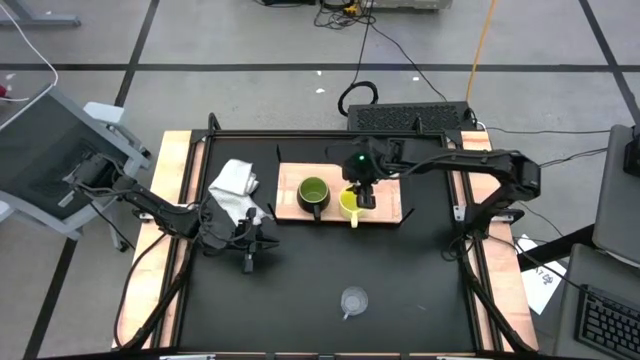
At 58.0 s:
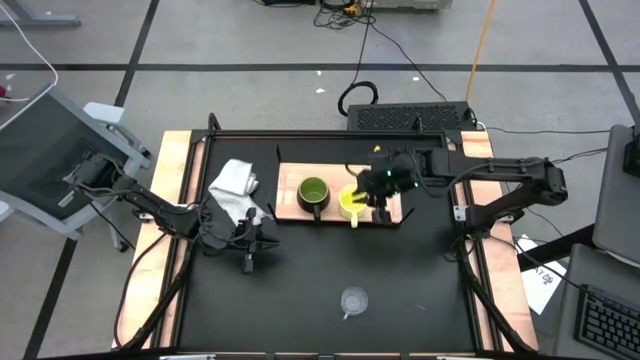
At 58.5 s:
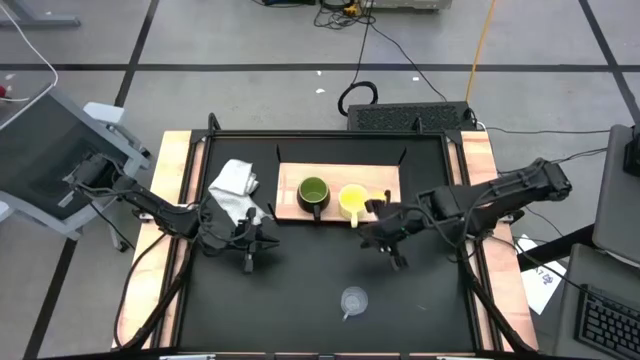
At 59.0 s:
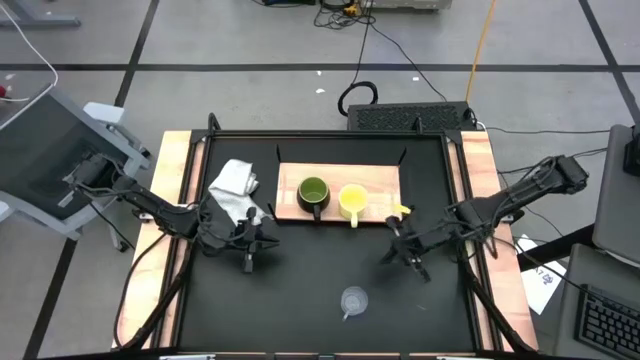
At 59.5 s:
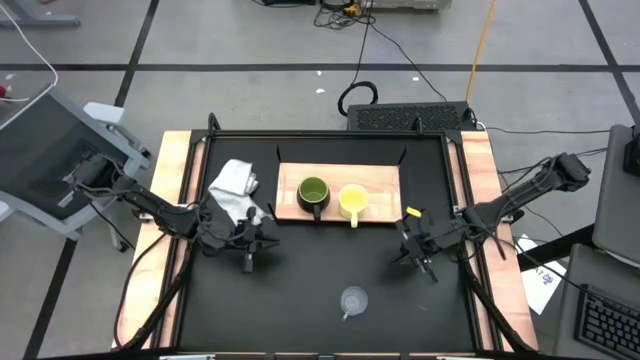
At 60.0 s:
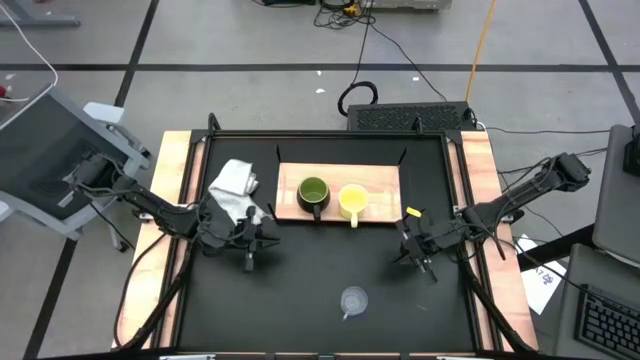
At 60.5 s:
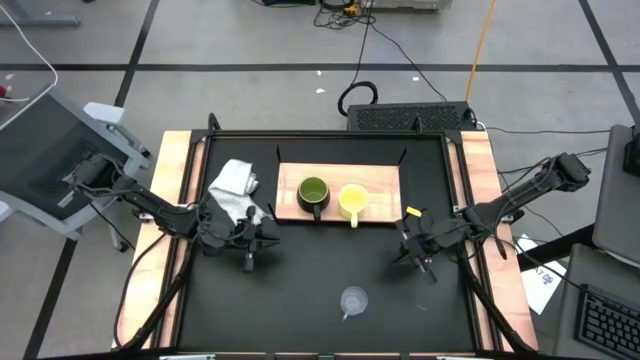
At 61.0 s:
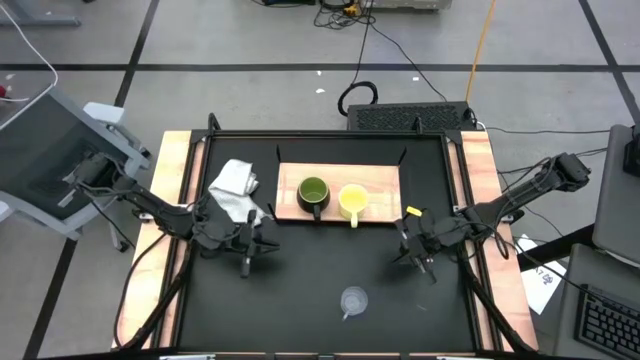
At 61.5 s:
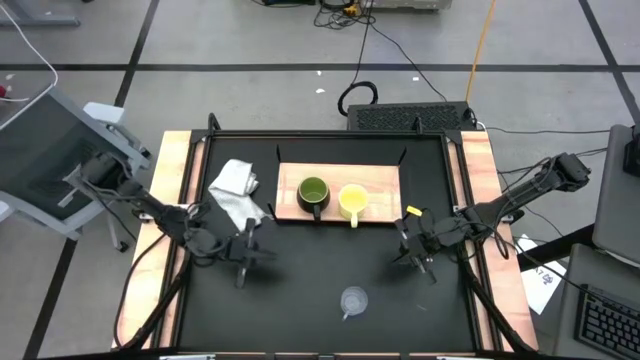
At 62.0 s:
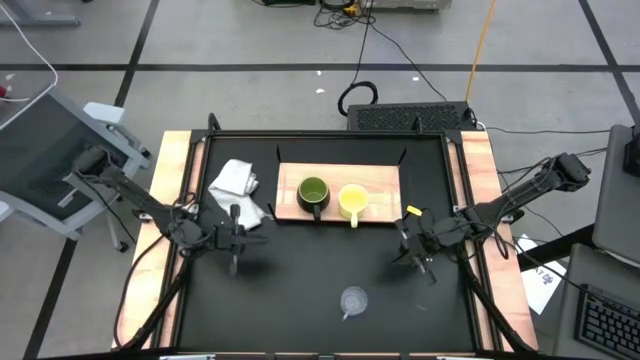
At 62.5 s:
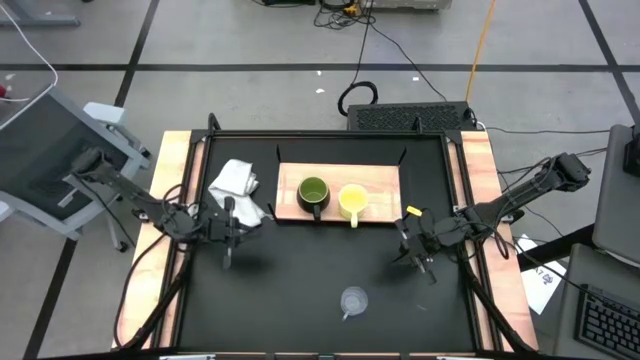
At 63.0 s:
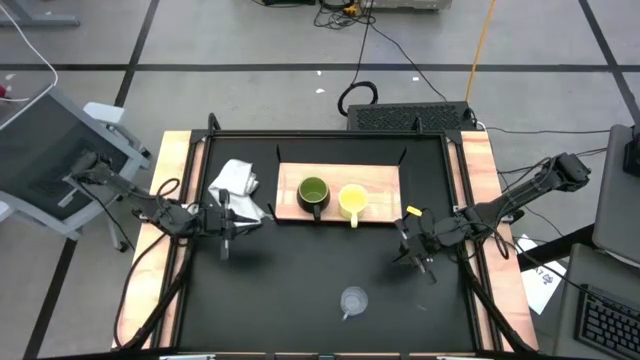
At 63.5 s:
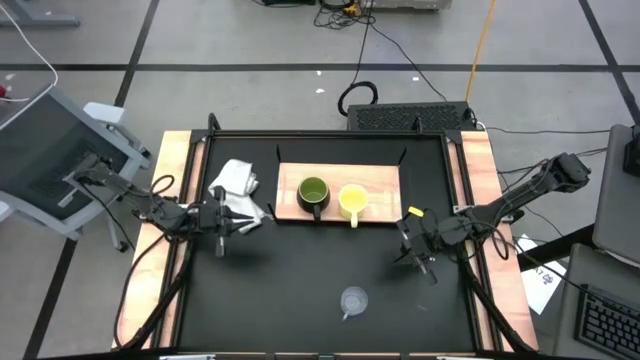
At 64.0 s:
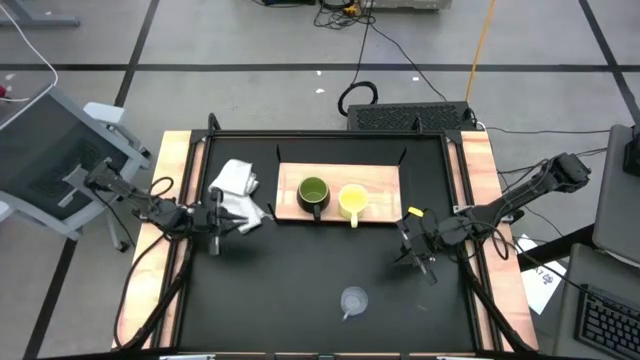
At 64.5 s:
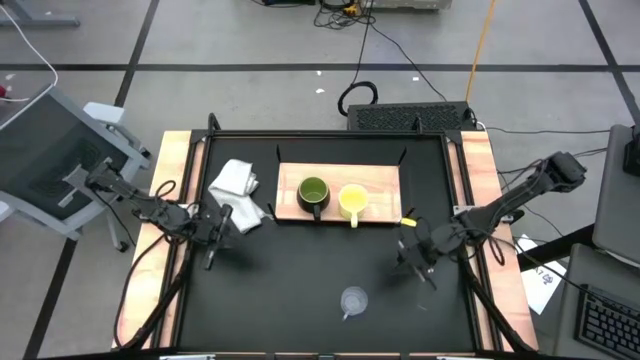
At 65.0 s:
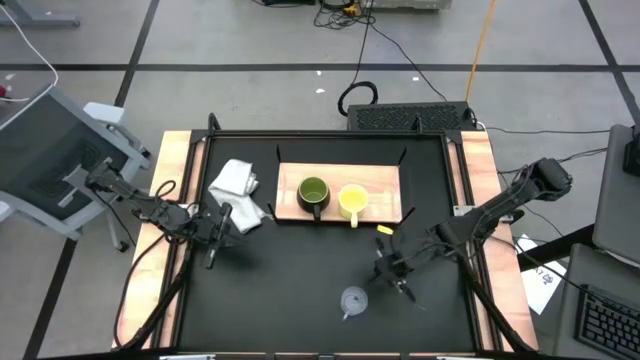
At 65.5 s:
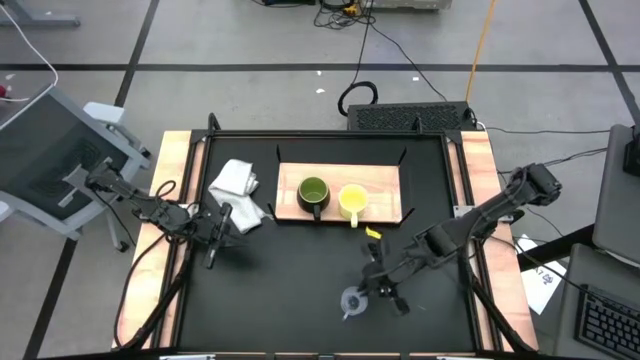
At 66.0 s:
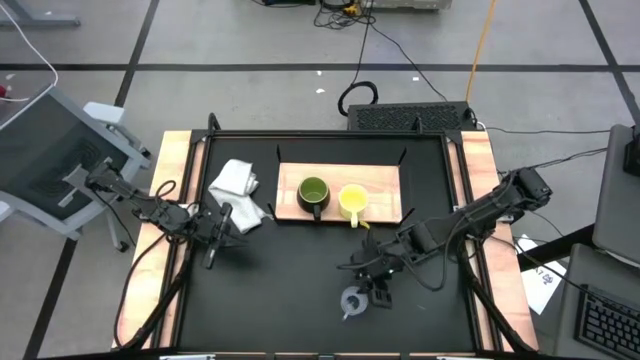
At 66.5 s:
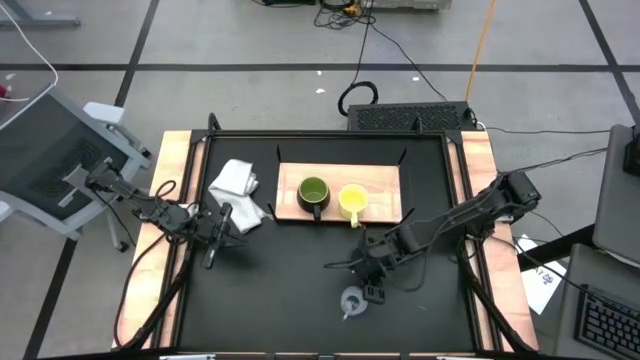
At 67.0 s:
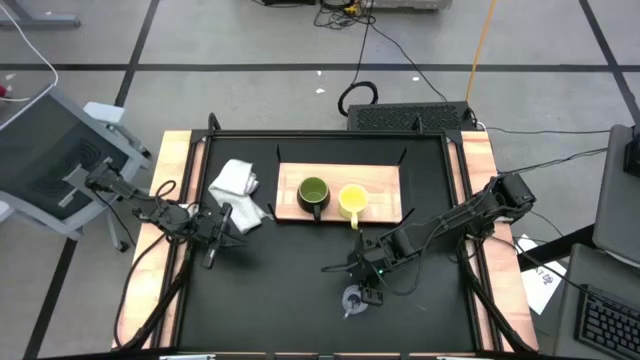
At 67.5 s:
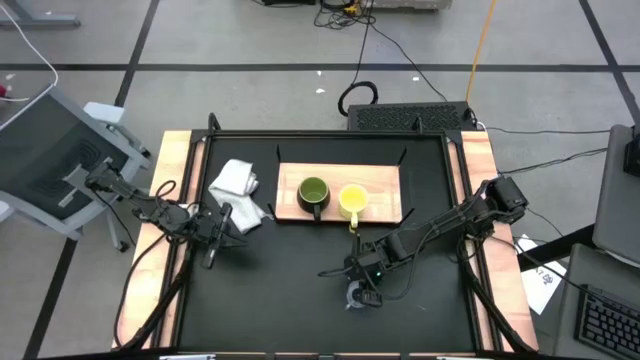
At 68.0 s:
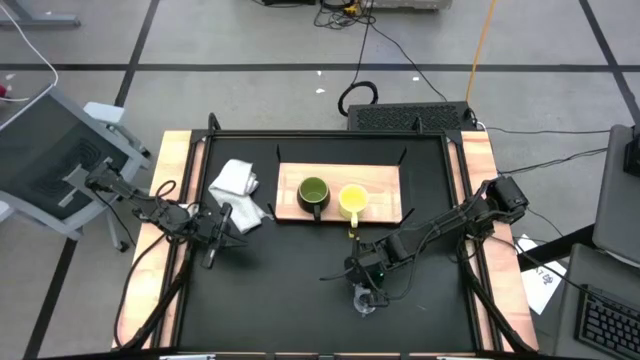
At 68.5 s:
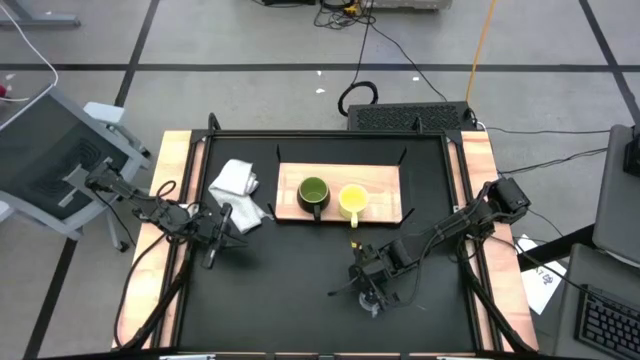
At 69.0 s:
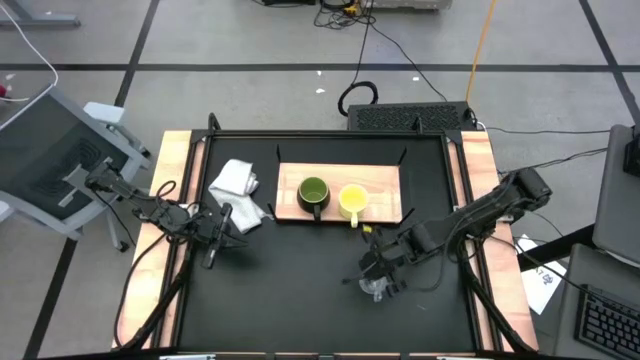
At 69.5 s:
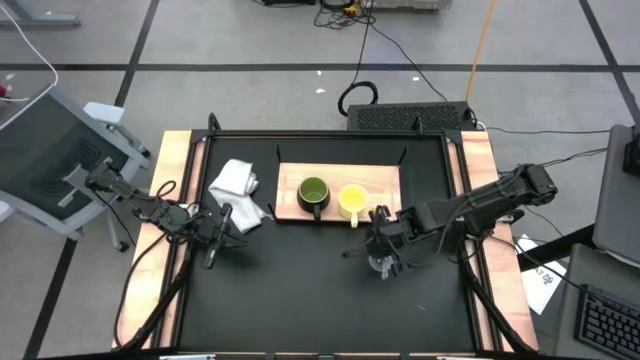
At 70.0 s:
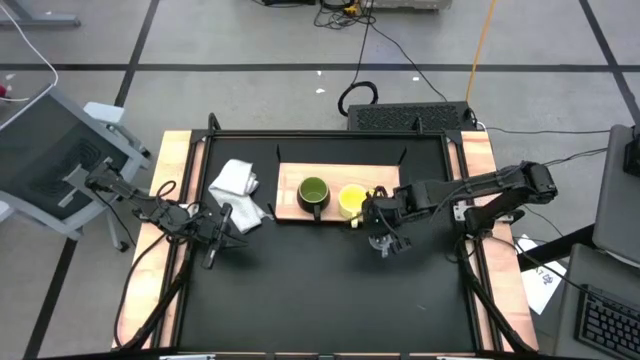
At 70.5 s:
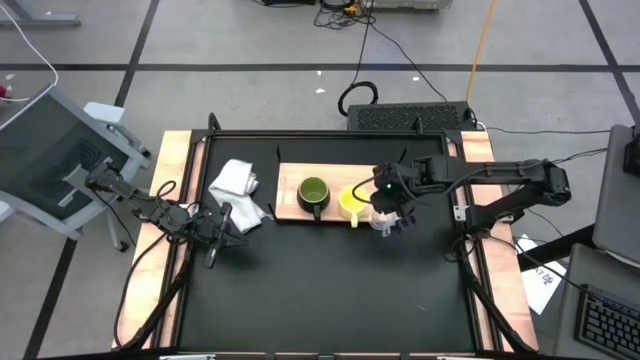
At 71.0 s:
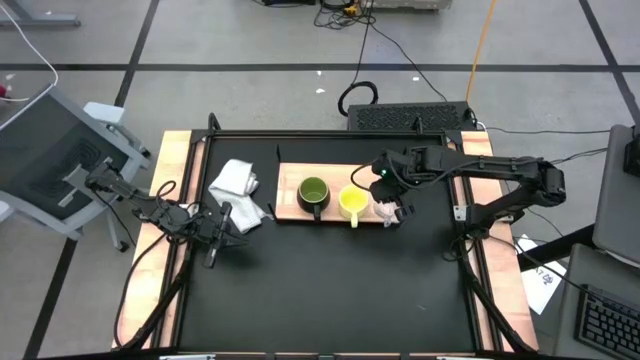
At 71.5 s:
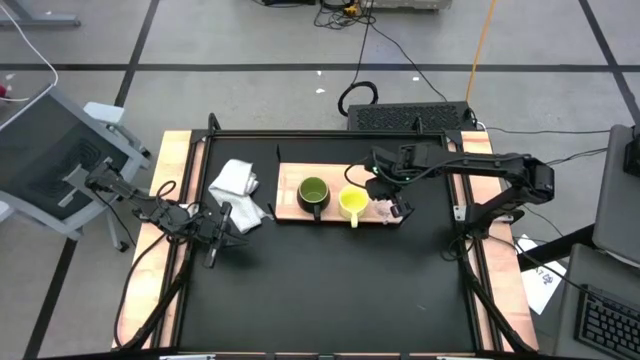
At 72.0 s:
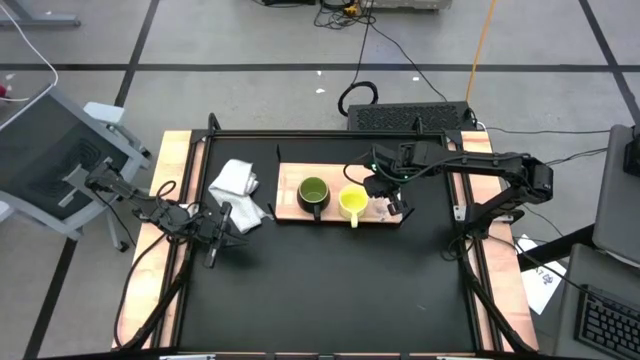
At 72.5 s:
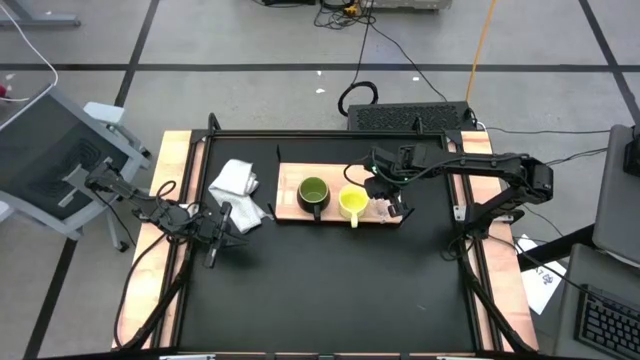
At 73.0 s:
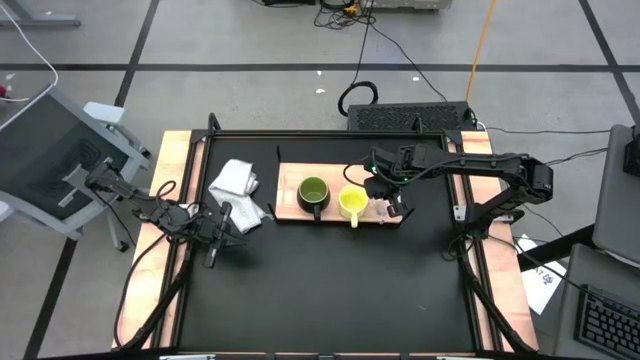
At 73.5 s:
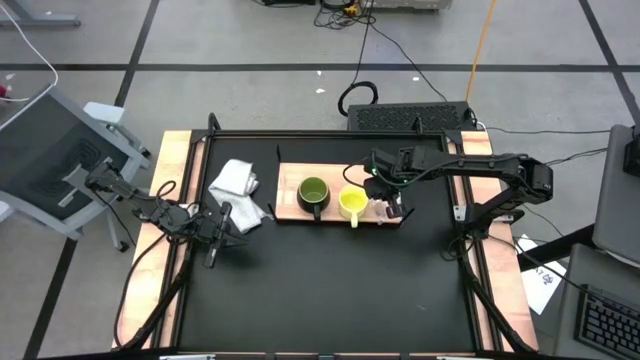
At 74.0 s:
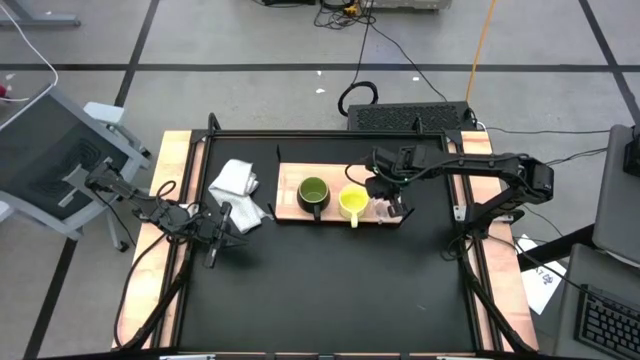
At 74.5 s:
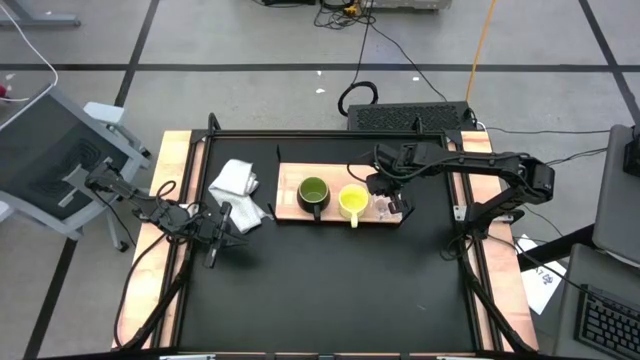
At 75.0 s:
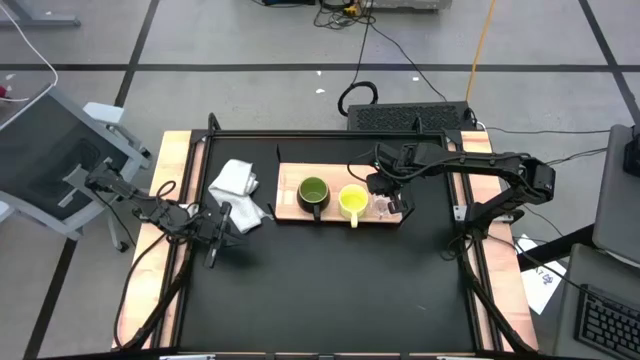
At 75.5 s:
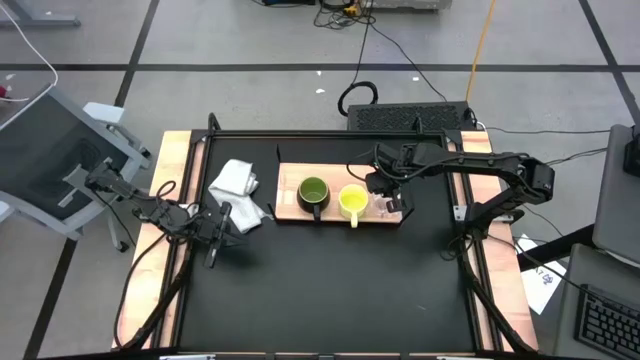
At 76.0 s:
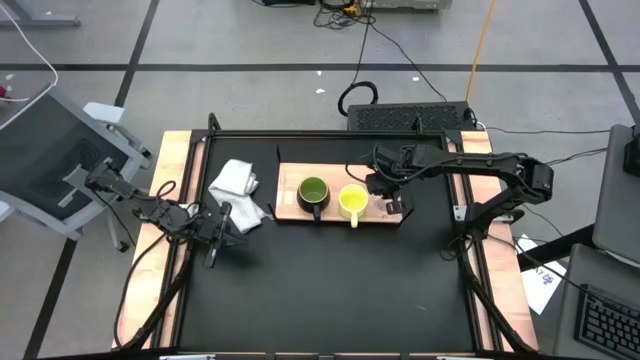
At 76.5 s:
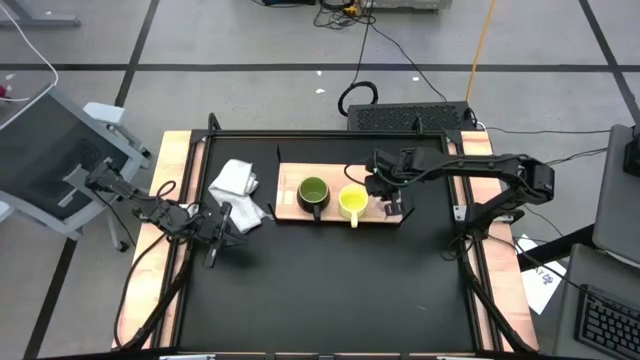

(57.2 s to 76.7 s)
Task: Stack small to large cups/mugs on shelf
Put the transparent mug on the shelf

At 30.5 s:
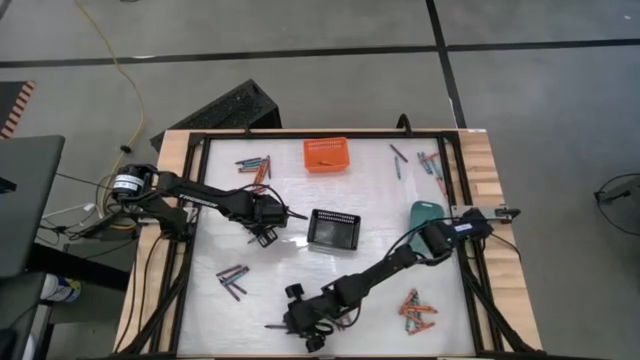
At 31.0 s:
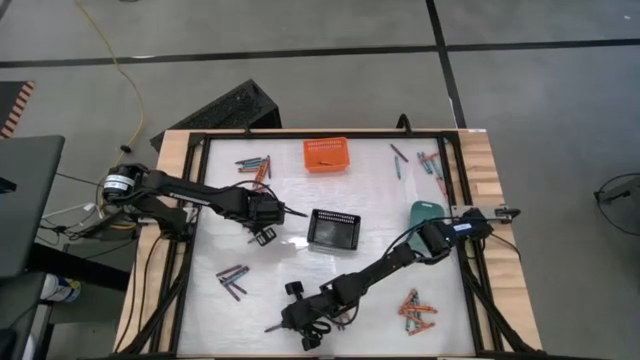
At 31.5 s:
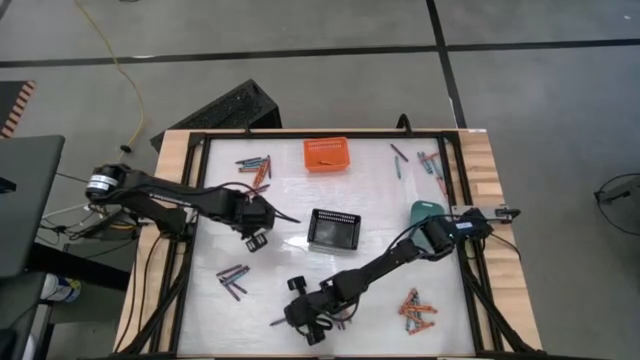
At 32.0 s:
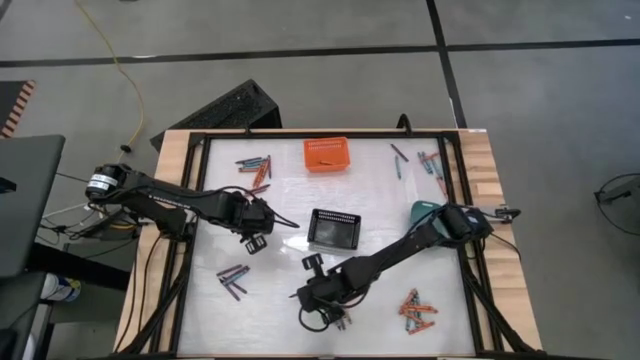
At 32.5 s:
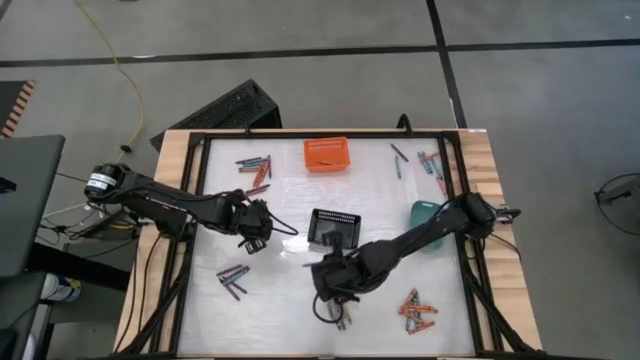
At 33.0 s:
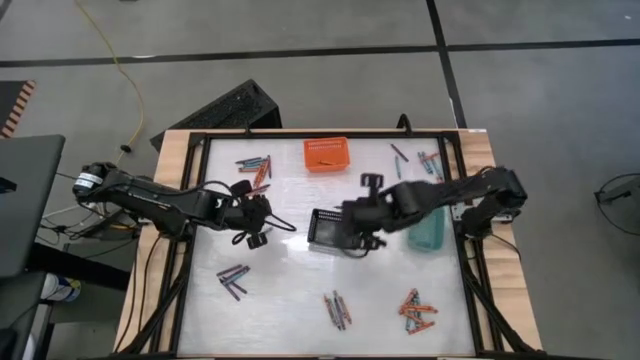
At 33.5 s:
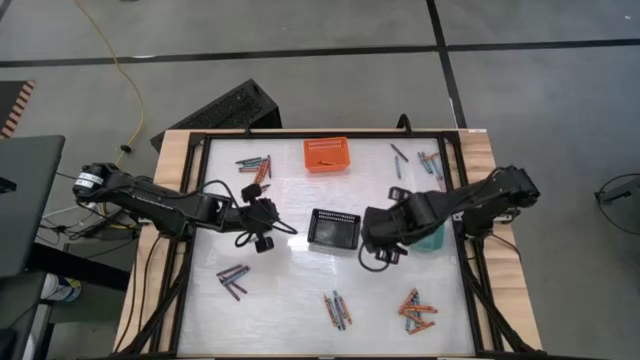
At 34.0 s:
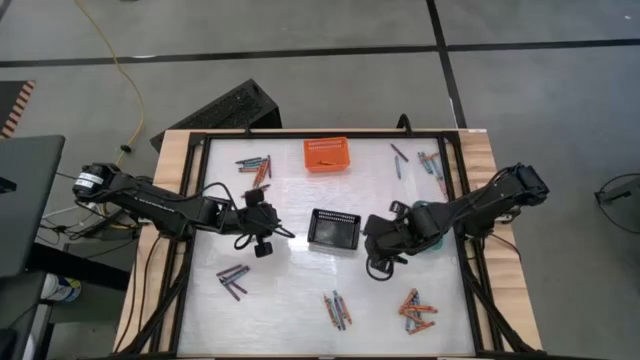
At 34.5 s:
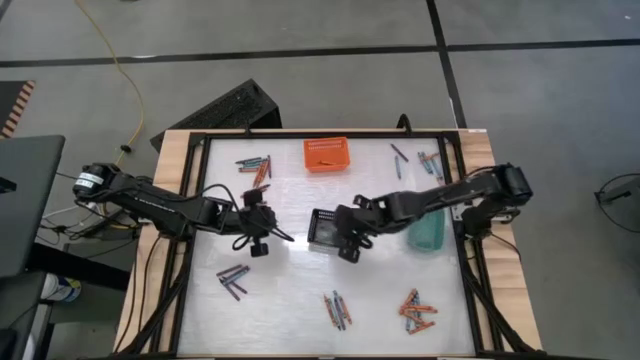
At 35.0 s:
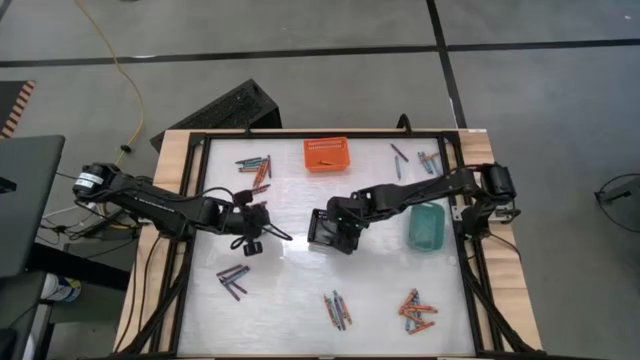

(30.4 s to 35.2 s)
Task: Sort crayons
Put the violet crayon into the black bin
